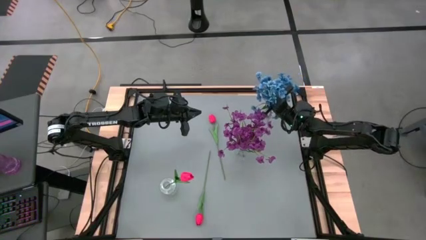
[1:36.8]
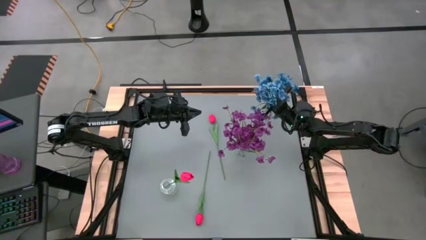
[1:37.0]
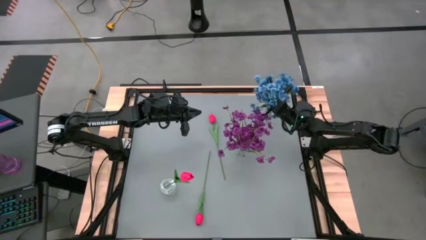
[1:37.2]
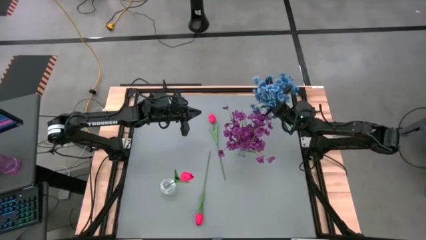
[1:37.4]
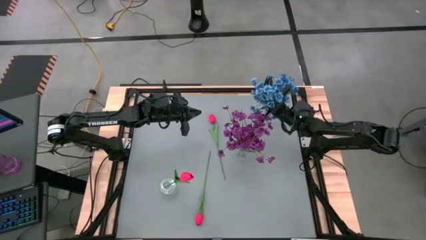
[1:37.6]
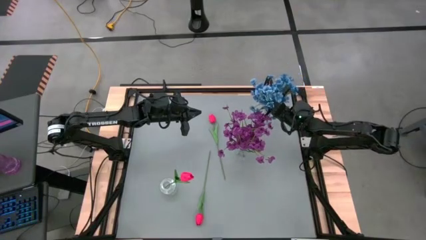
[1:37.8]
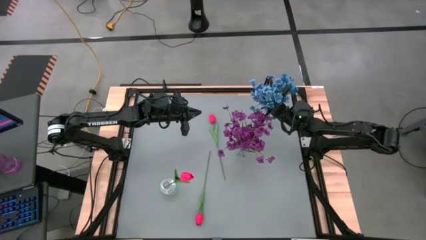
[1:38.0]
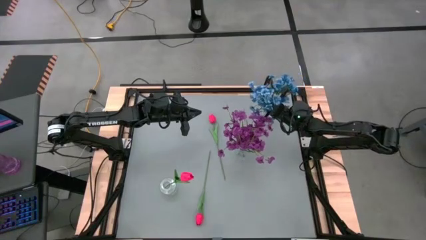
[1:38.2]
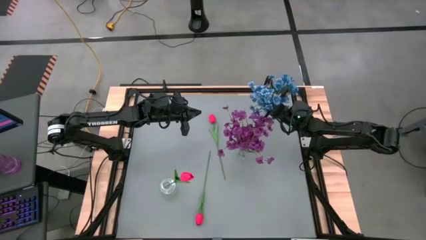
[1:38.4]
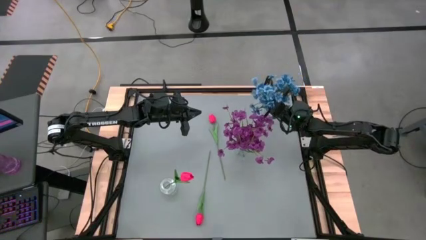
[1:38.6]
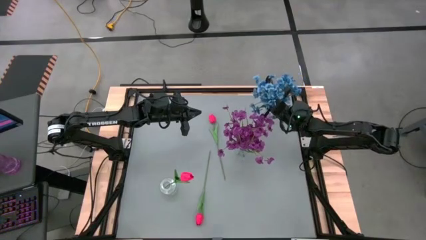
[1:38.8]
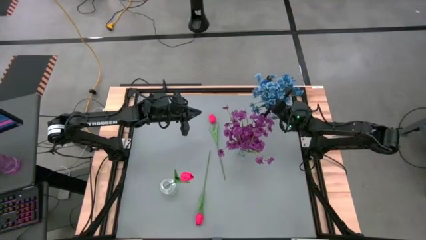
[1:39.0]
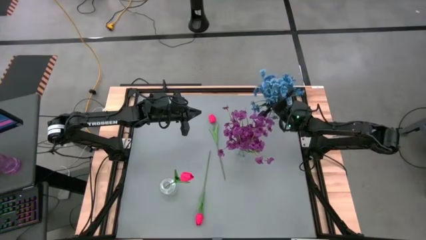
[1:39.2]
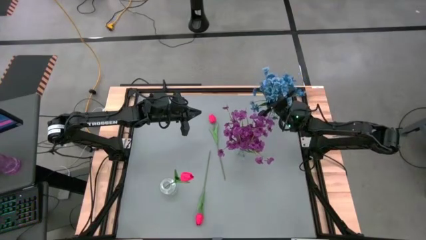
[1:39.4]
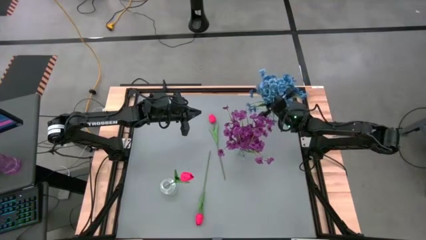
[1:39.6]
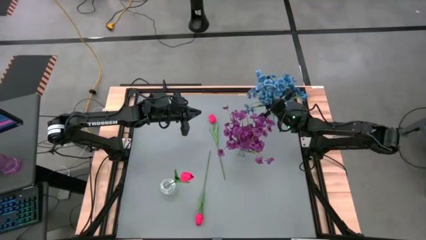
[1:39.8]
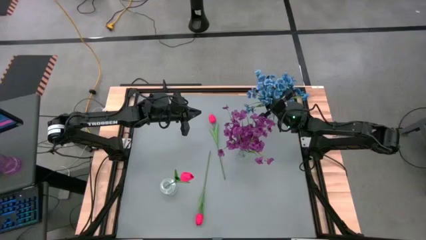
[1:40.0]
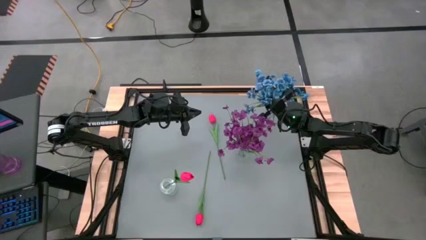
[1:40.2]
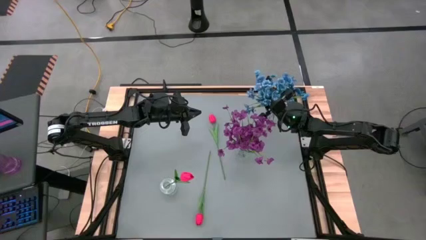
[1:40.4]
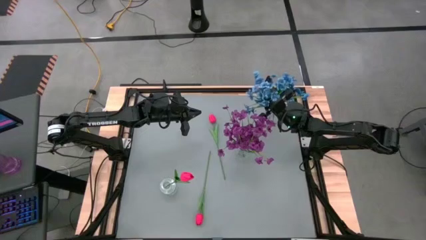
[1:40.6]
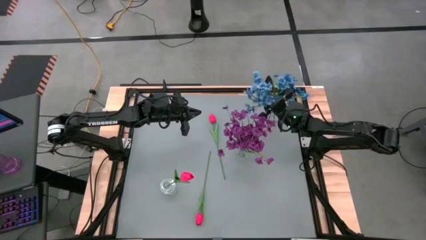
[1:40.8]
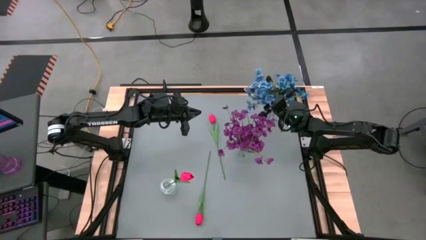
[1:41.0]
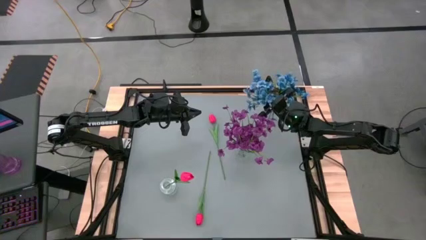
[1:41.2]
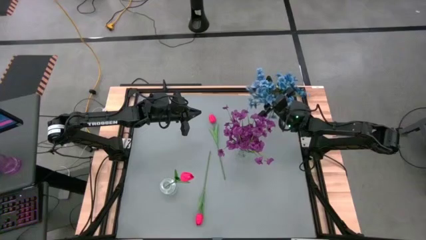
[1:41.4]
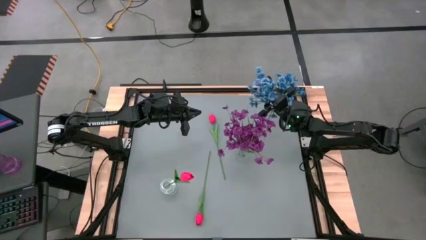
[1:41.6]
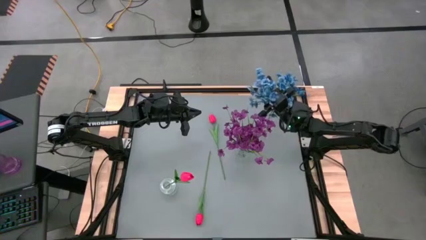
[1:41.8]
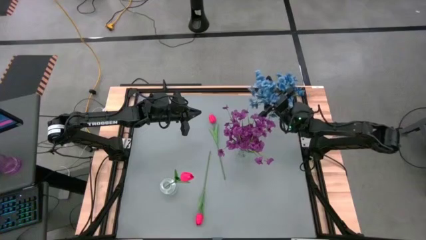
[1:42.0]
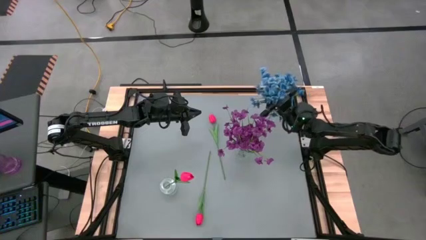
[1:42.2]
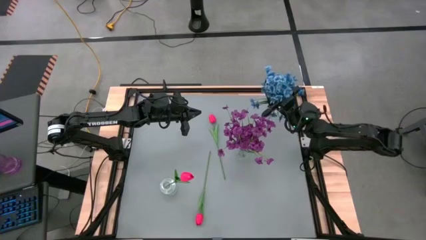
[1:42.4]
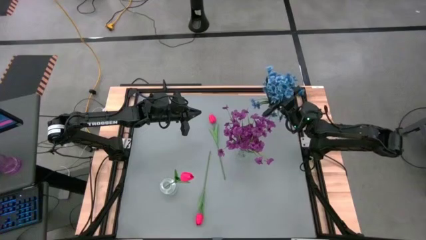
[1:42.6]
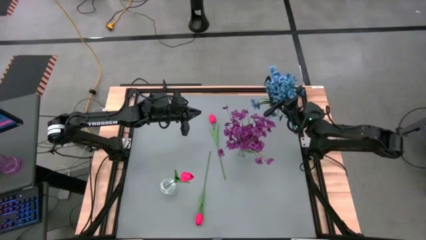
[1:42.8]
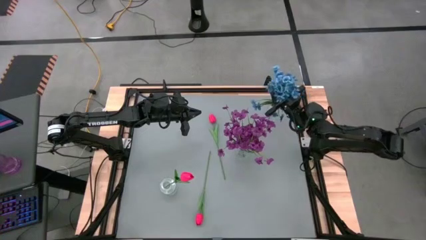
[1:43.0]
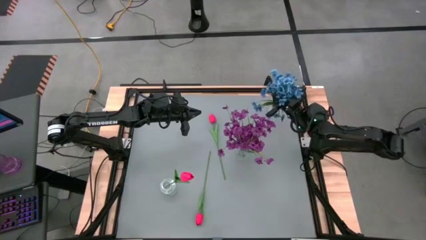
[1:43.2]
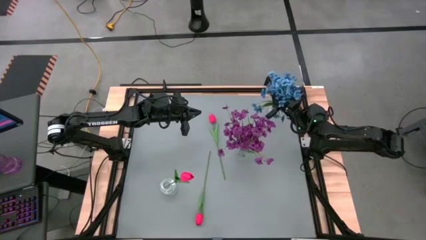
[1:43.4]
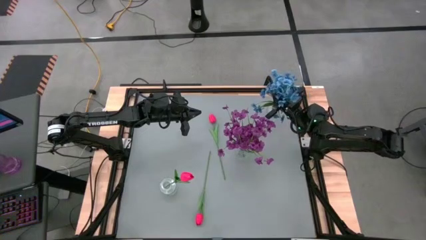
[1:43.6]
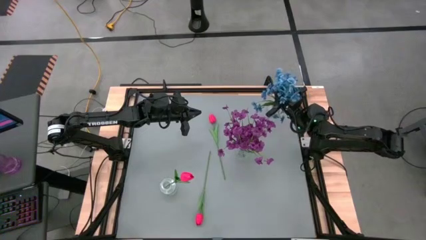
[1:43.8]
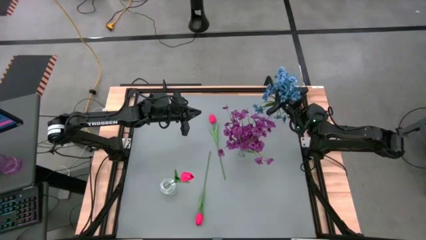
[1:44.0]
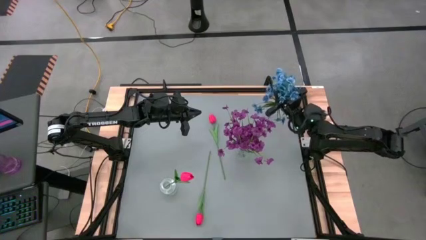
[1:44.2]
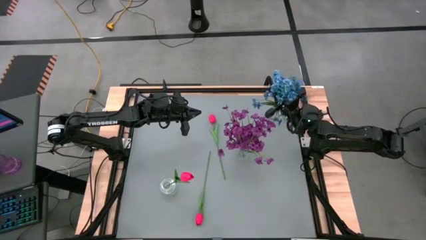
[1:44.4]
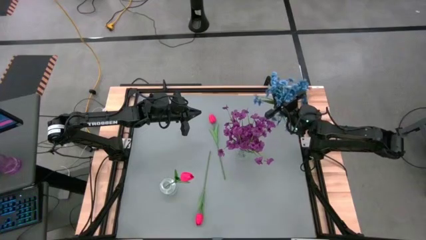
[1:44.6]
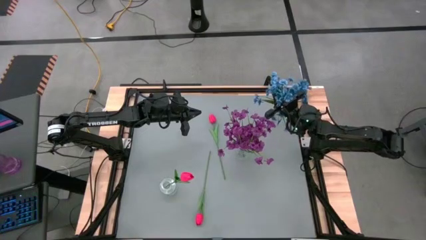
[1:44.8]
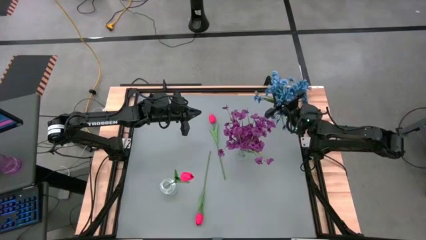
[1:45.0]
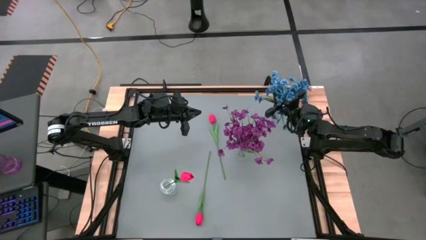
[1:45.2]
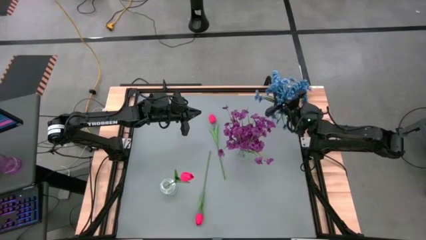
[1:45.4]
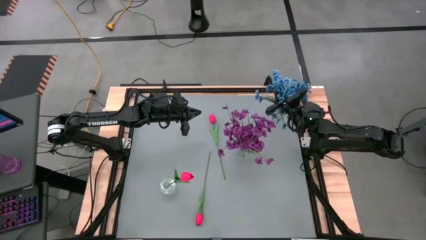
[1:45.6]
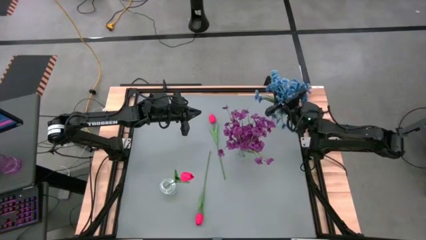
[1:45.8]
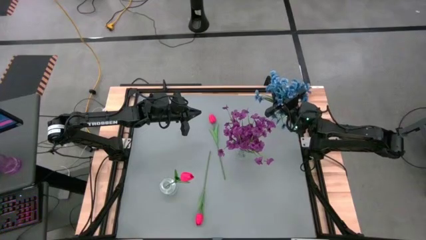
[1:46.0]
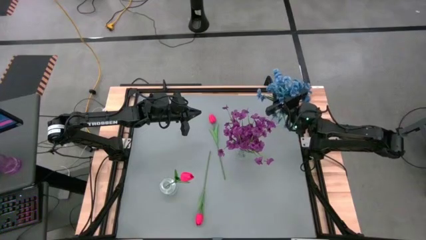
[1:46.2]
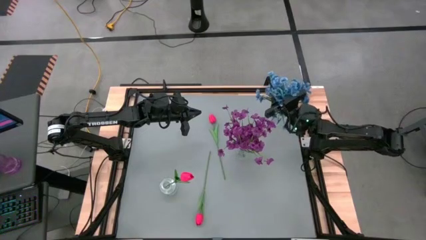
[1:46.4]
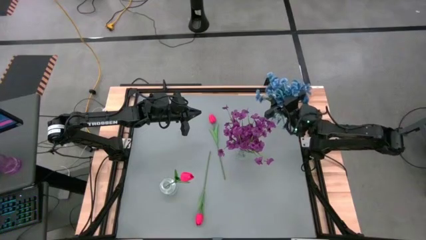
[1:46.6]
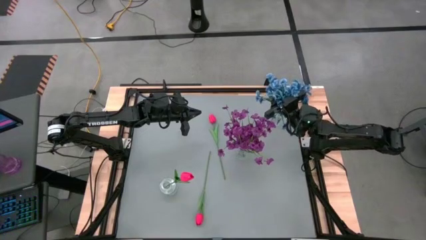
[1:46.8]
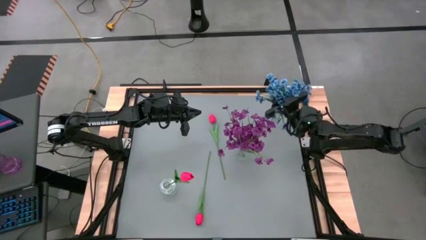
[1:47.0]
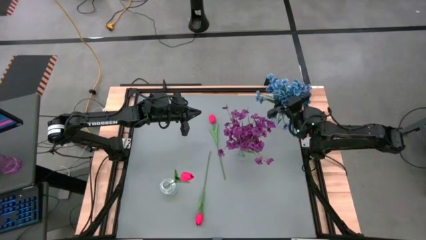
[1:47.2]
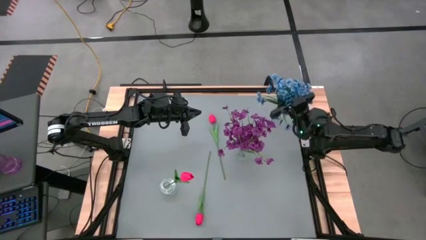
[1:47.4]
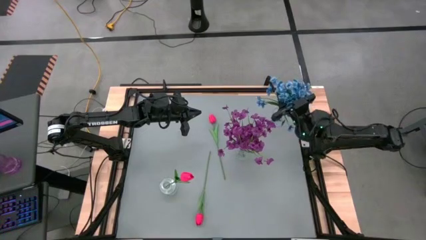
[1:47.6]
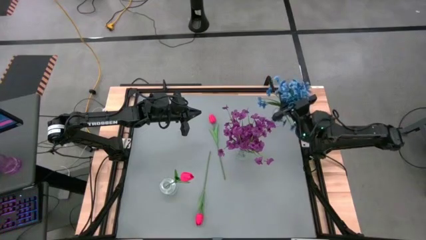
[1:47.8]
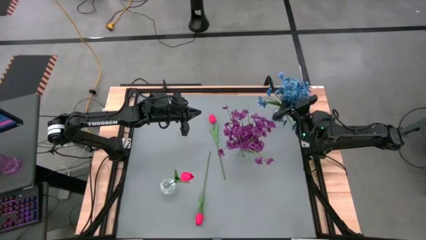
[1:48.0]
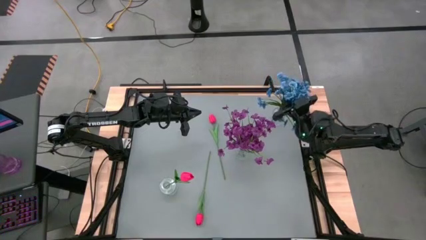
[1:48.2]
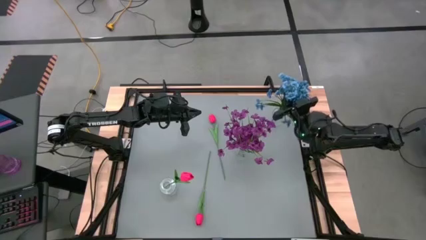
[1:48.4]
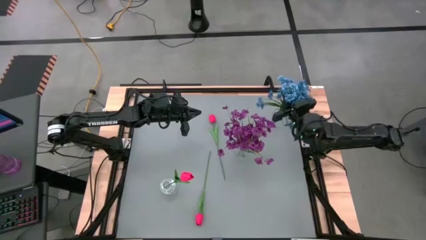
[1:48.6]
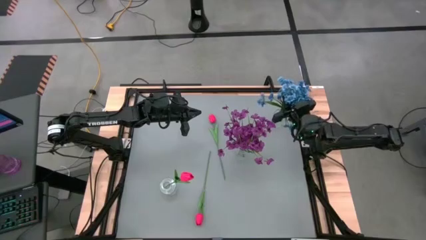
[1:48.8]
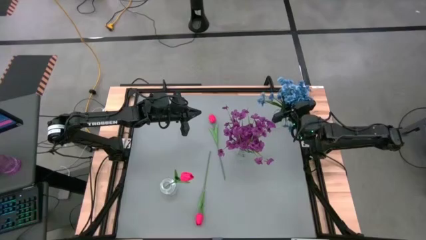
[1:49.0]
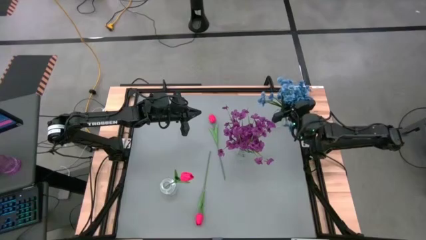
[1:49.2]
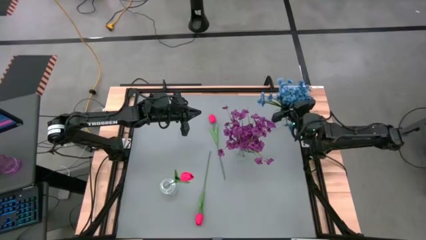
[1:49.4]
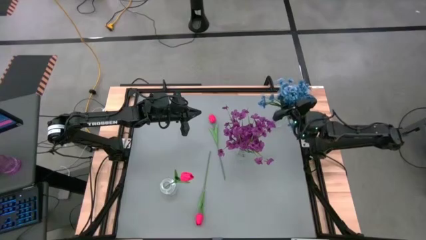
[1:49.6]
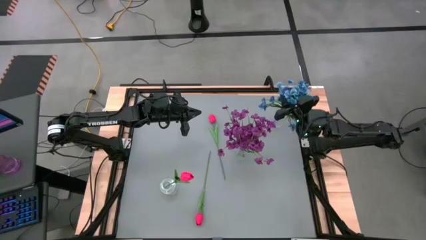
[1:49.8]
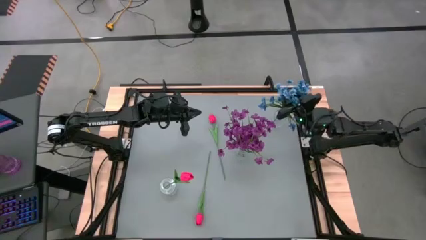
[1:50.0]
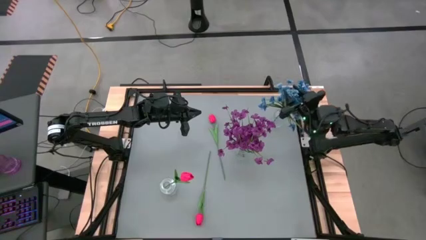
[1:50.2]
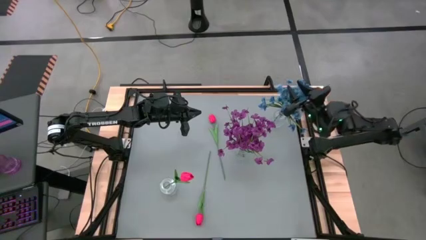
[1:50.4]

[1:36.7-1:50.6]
Task: Sort flowers into vase by color
Put the blue flowers into the top transparent vase
